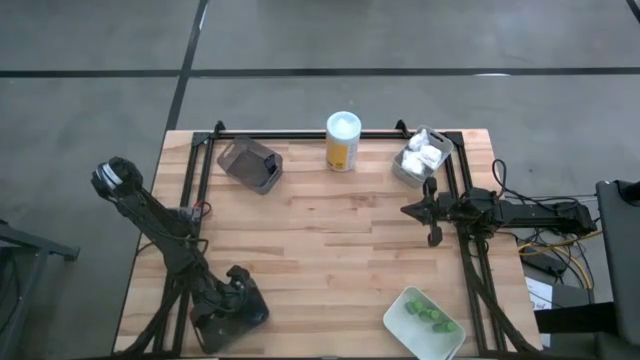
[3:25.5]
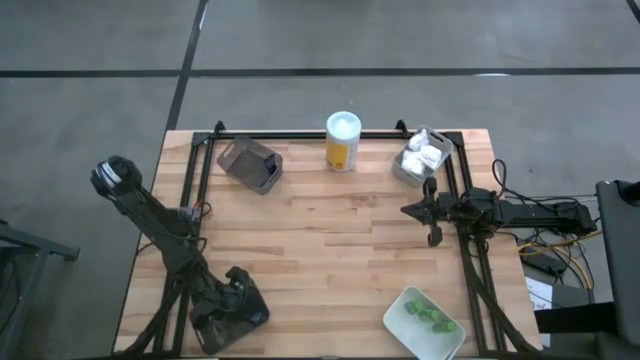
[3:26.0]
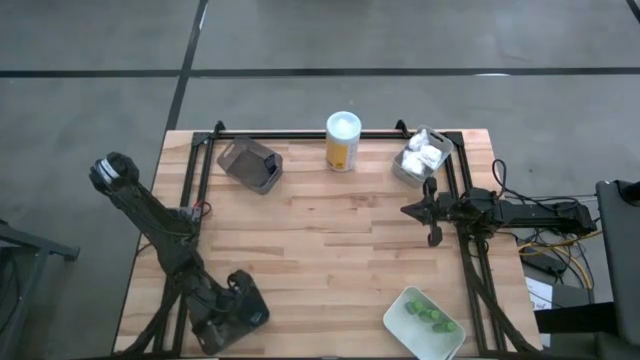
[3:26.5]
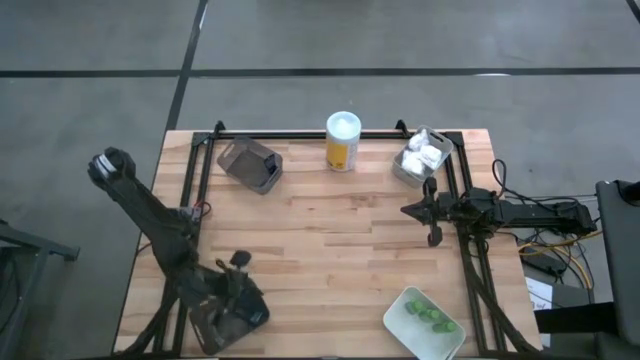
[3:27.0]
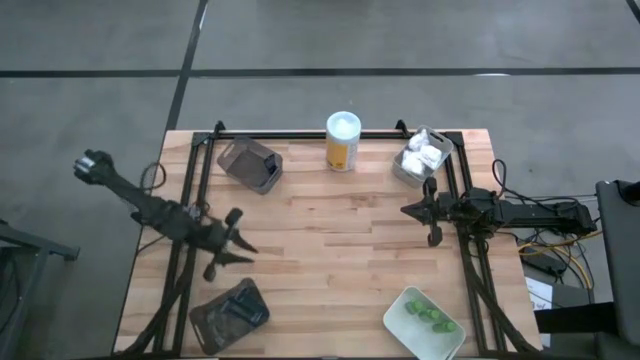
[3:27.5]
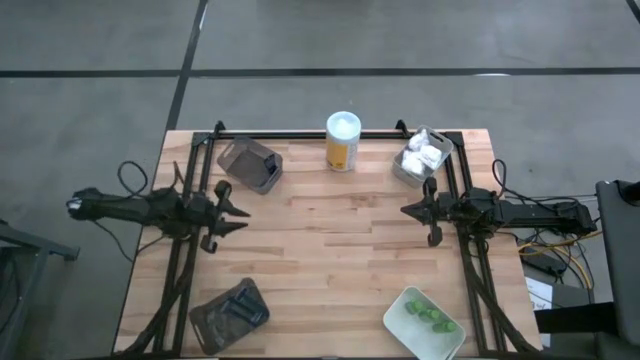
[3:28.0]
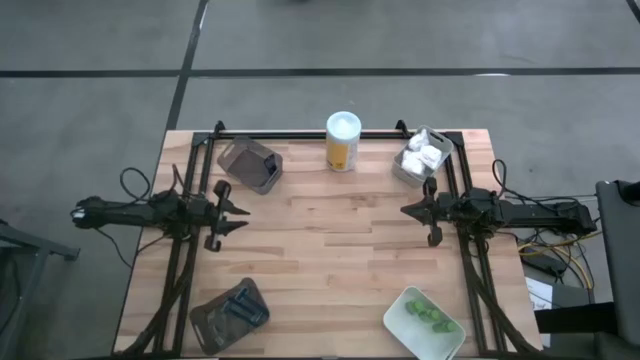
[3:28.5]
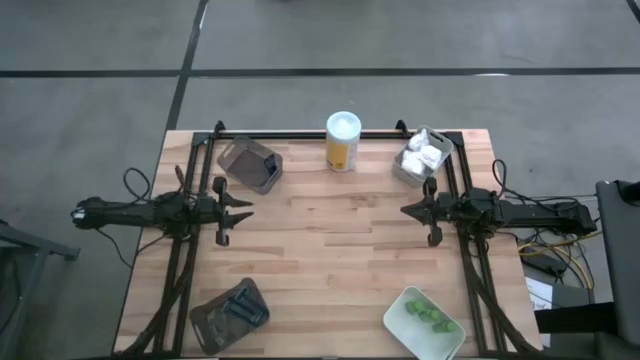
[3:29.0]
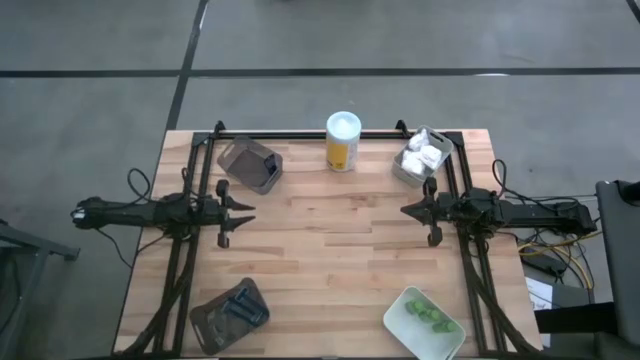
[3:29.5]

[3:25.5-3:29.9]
Task: Pick & Place Travel size toiletries
Return to Home Position

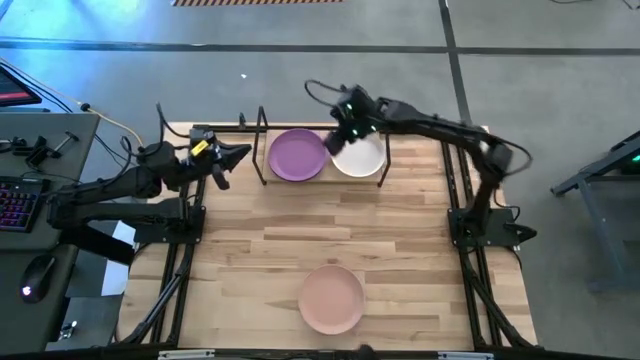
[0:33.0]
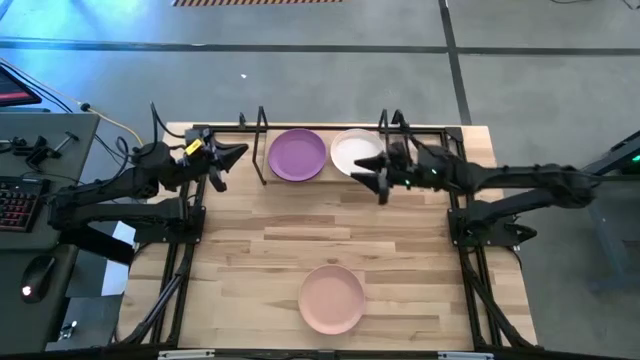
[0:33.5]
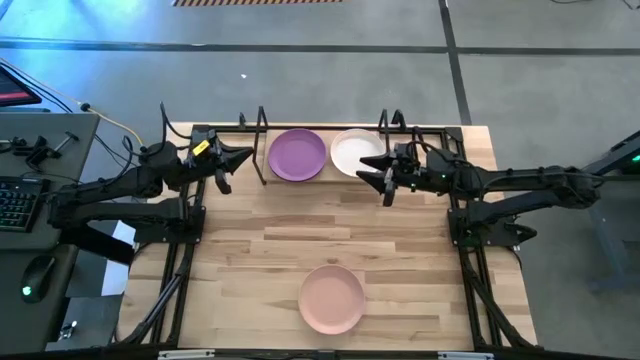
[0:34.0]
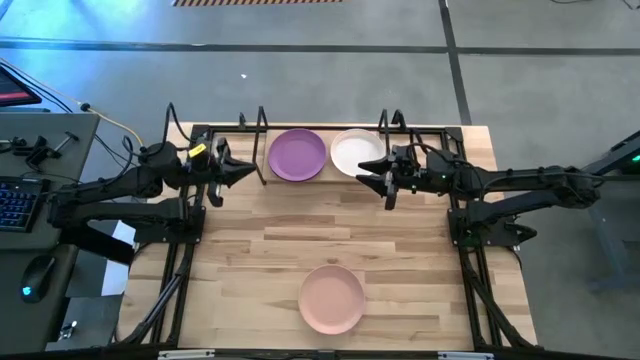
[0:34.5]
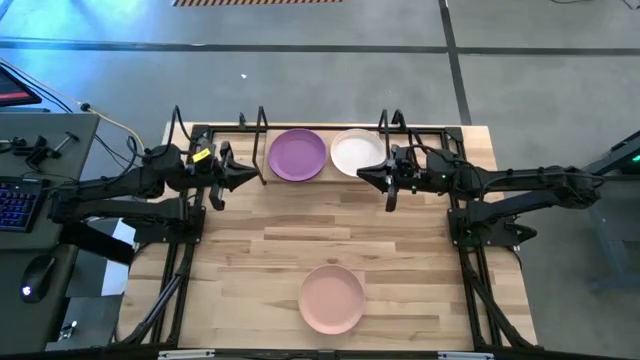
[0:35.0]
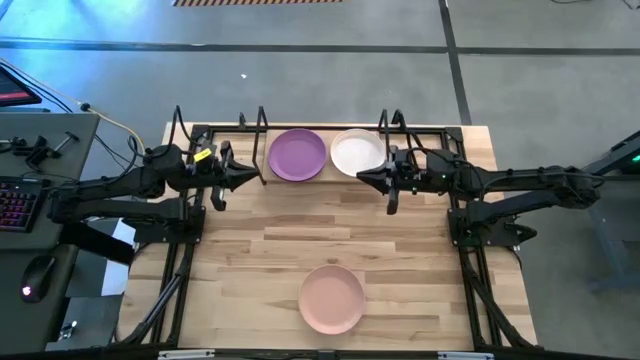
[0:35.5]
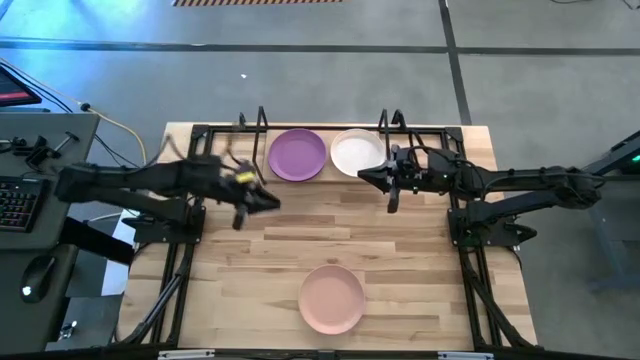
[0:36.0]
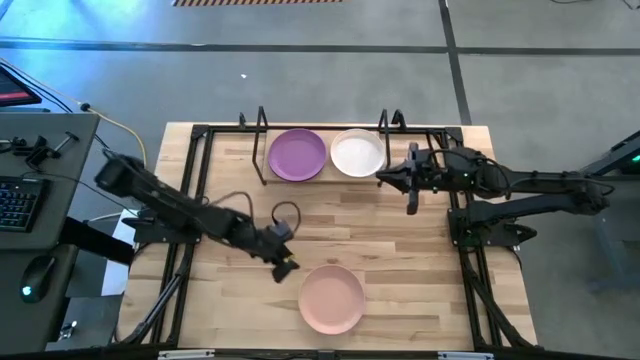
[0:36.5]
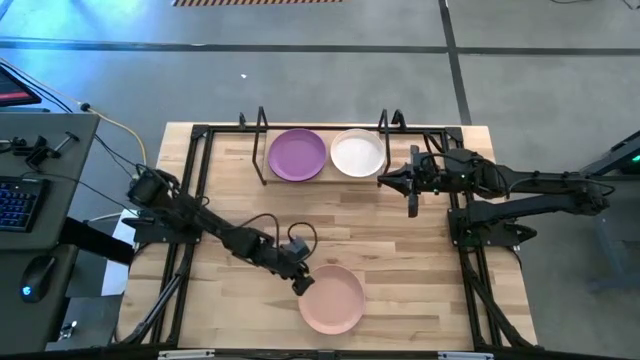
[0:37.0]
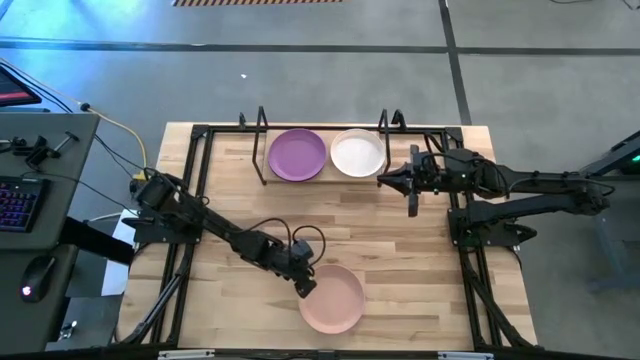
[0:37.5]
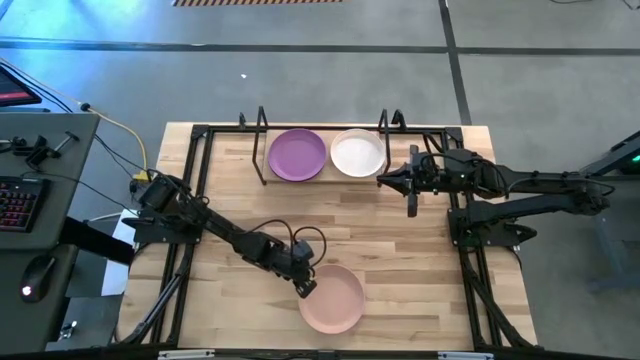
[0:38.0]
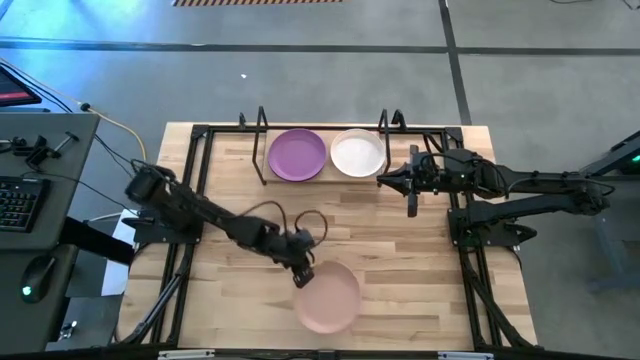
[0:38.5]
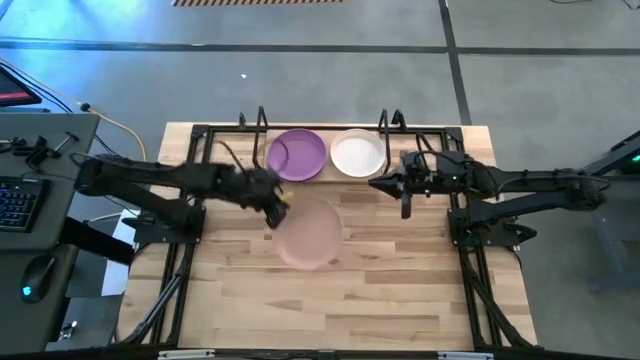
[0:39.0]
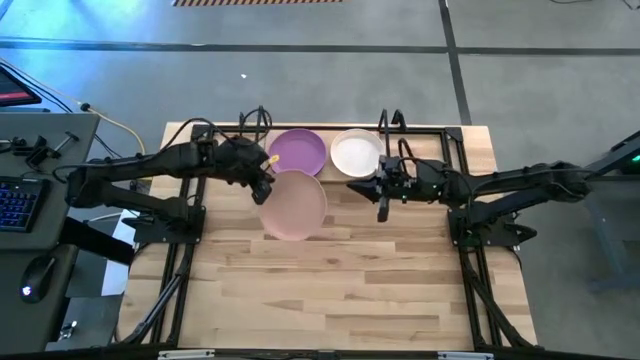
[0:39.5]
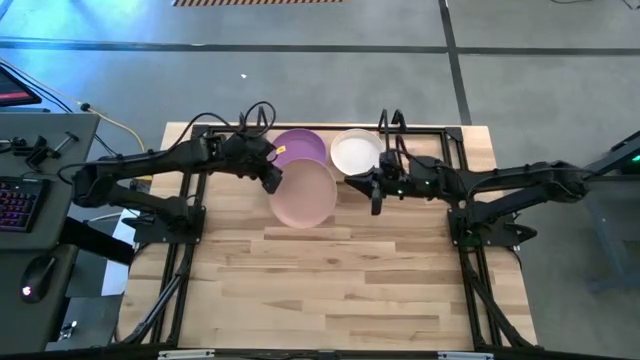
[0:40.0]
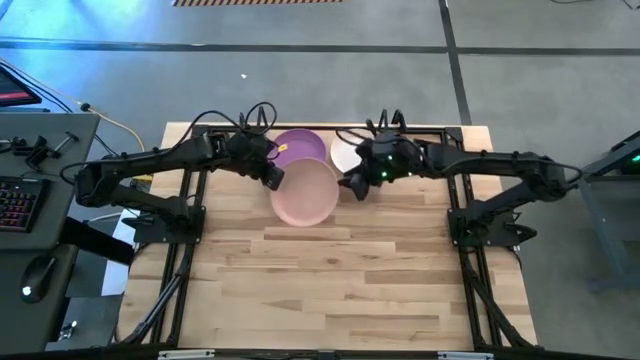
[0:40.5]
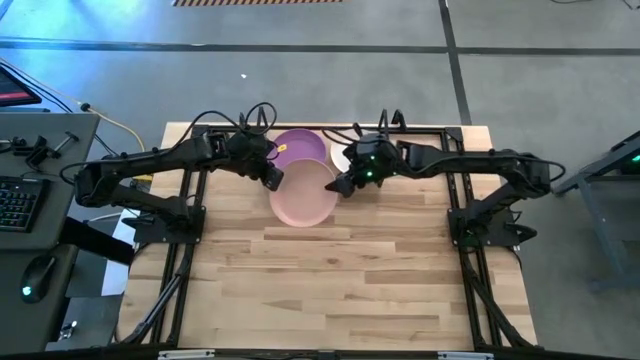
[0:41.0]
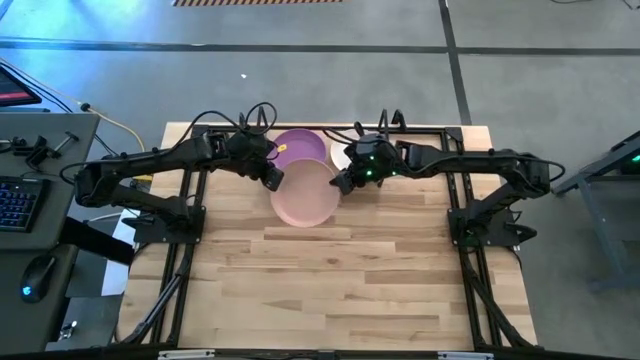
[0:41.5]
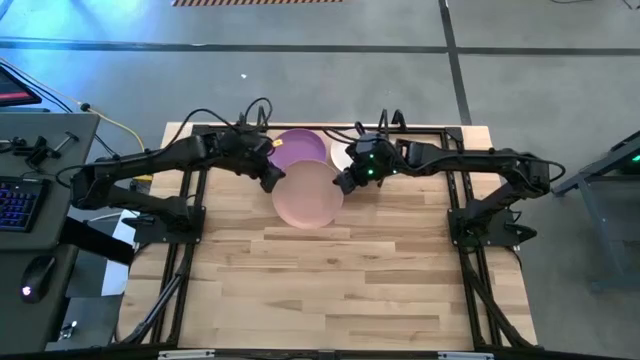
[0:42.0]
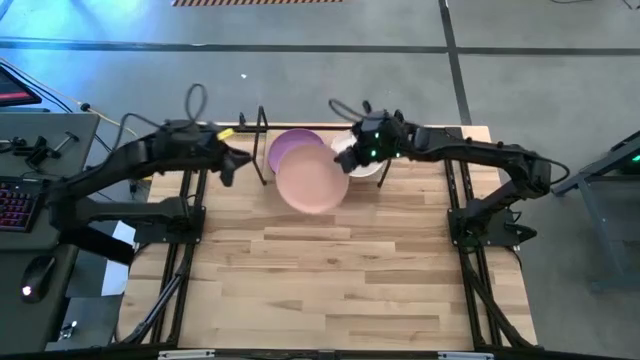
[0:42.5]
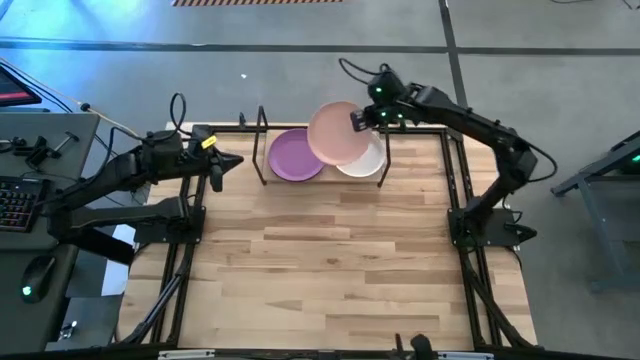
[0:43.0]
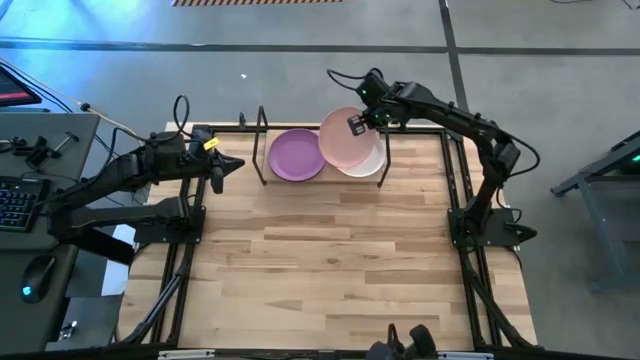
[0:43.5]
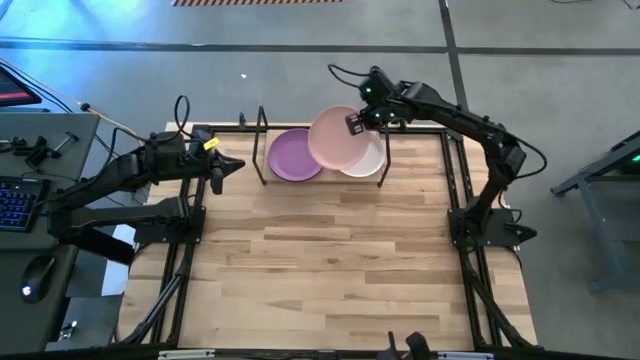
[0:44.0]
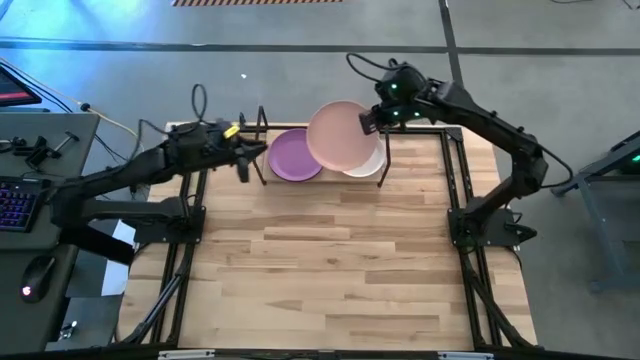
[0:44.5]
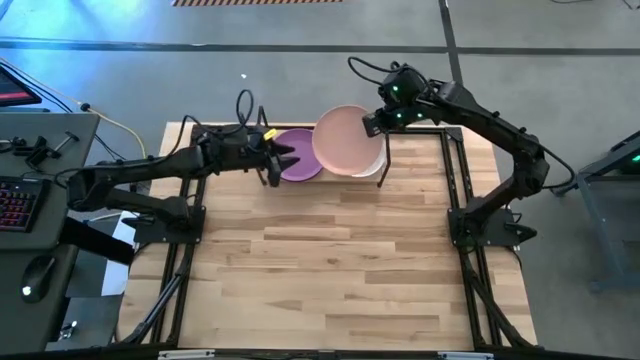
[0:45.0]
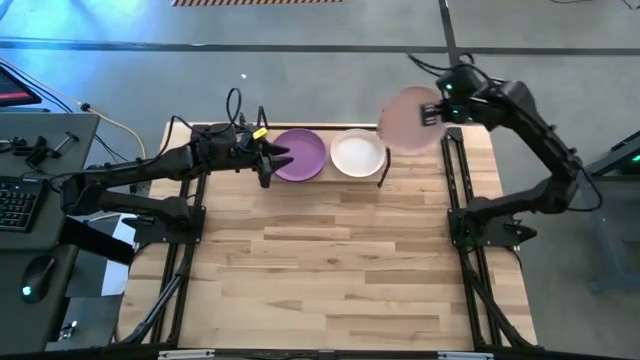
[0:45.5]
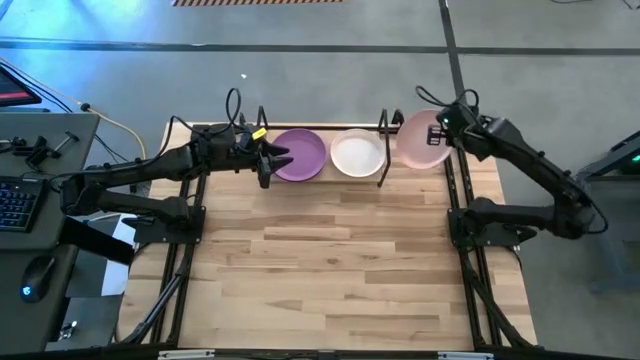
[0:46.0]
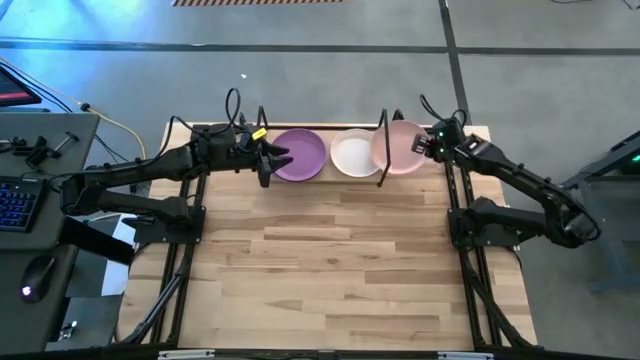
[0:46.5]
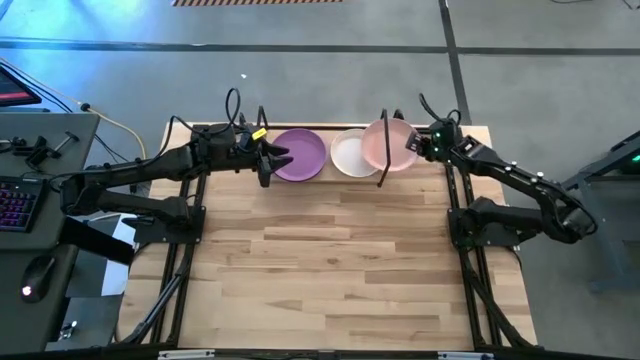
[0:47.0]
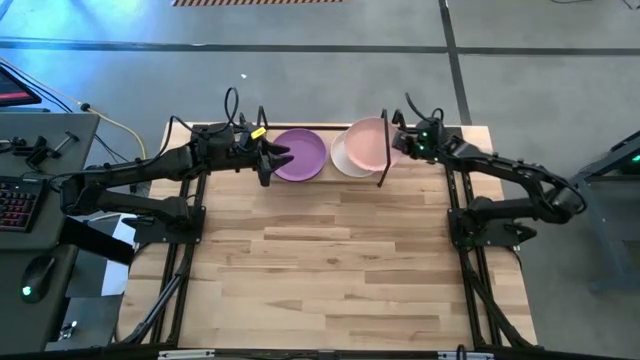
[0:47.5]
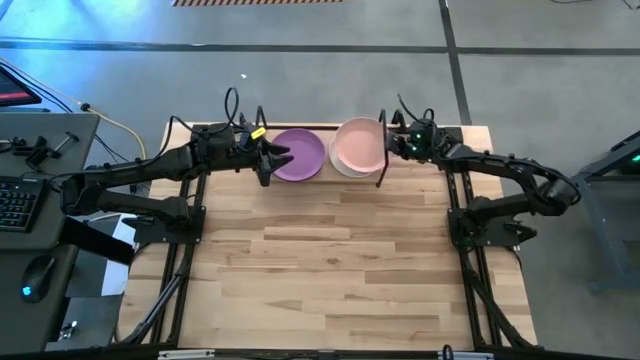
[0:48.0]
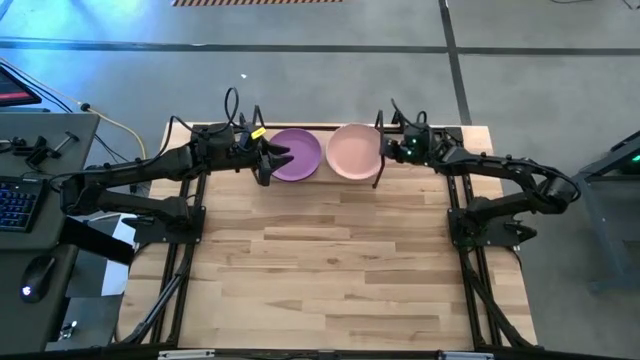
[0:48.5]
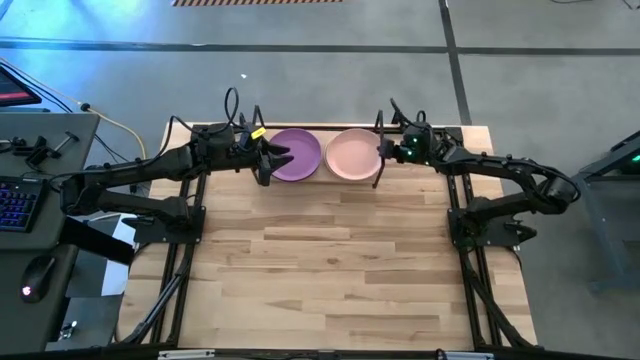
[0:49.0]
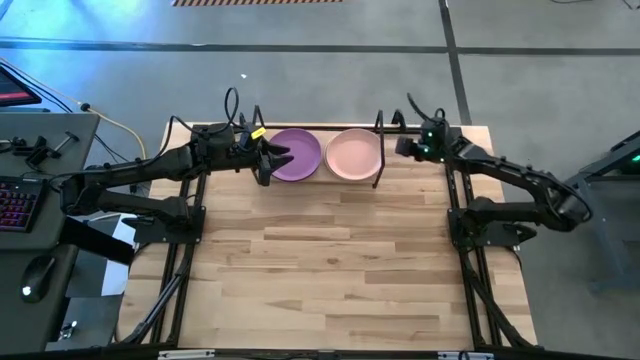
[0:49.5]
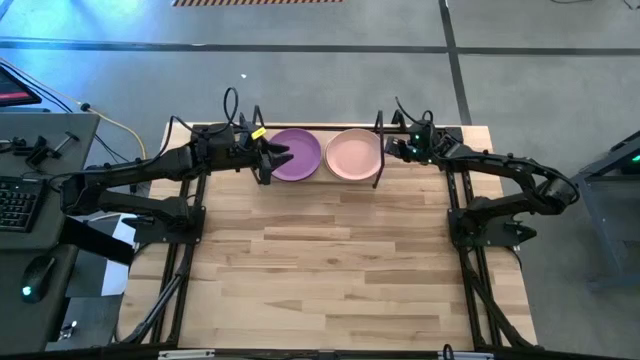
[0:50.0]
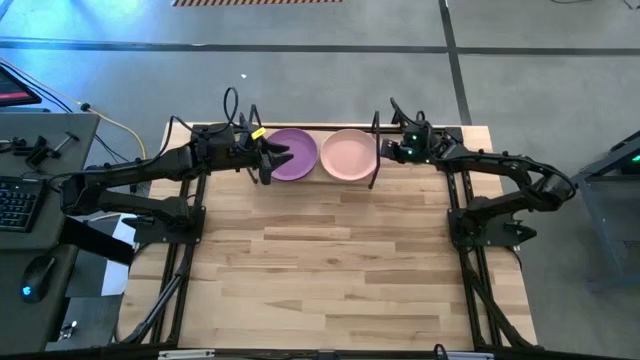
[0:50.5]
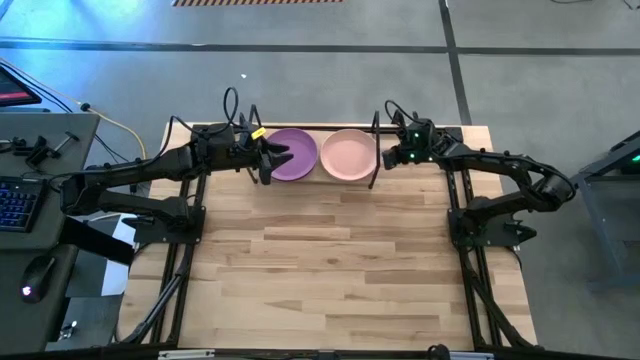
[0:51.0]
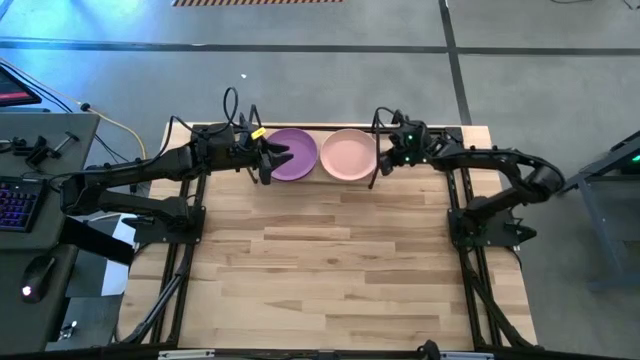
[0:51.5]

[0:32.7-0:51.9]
Task: Place and stack plates onto a shelf
Stack the pink plate on the white plate on the shelf
